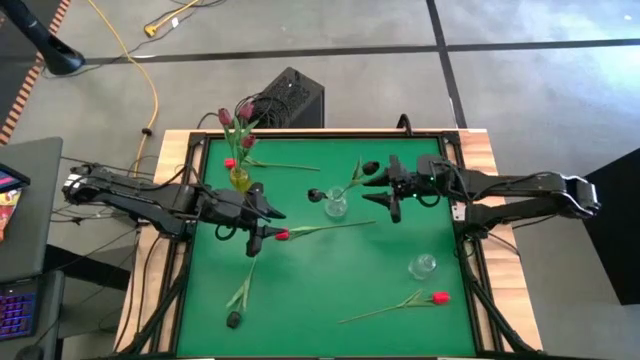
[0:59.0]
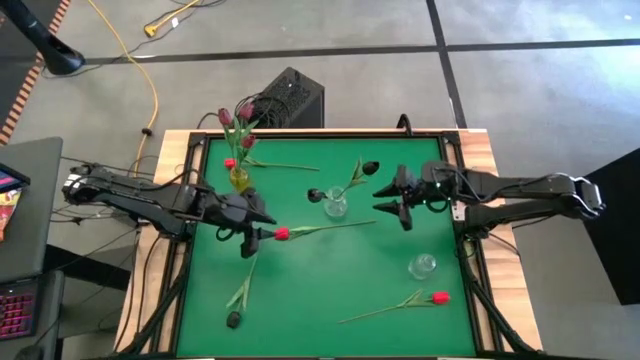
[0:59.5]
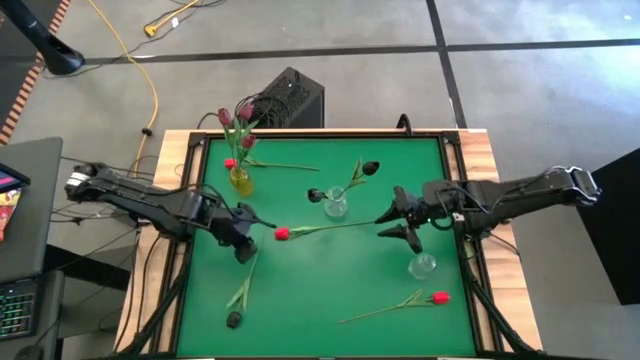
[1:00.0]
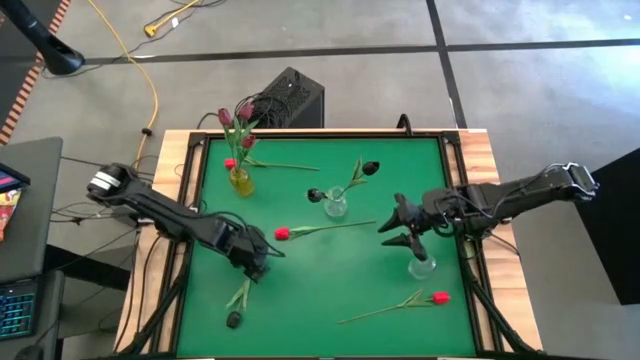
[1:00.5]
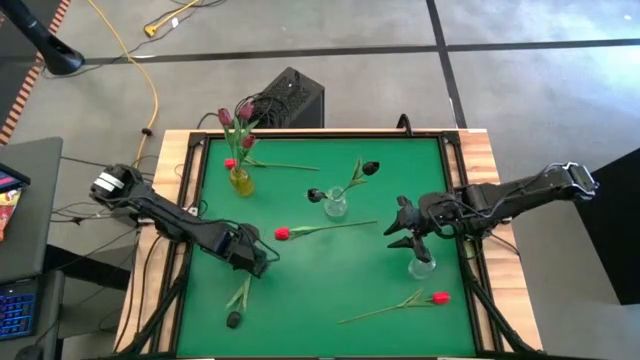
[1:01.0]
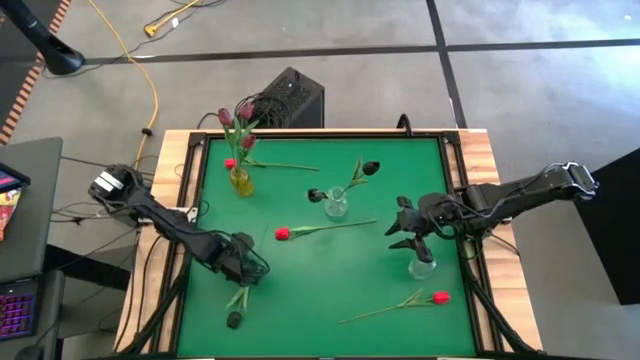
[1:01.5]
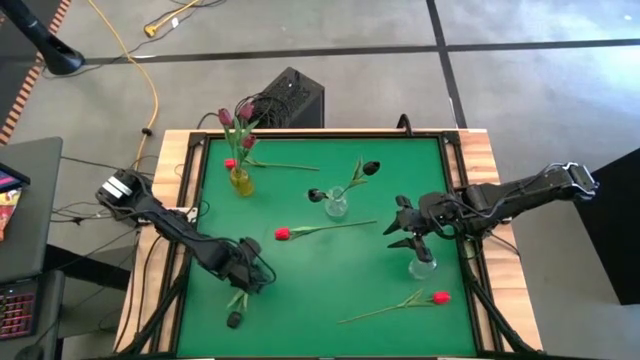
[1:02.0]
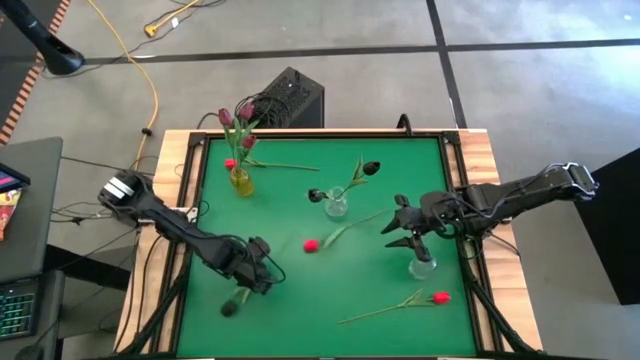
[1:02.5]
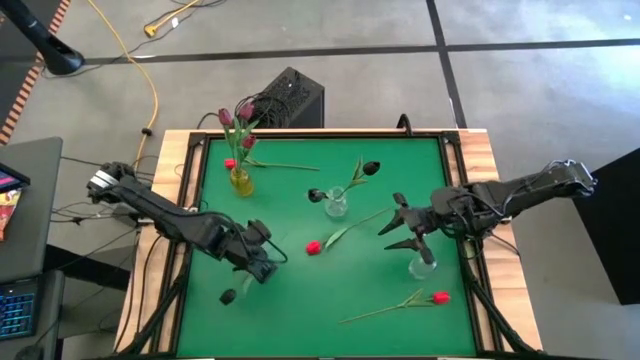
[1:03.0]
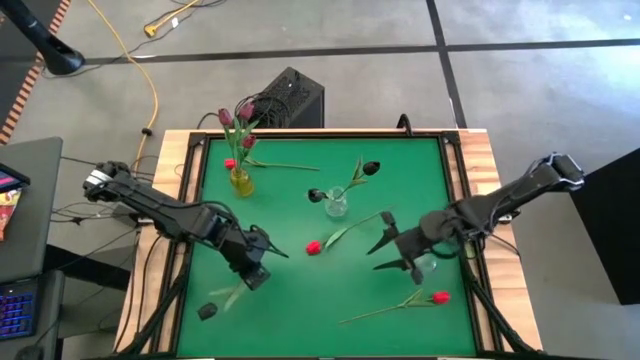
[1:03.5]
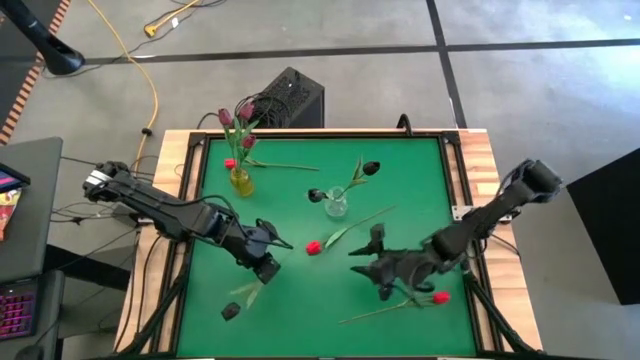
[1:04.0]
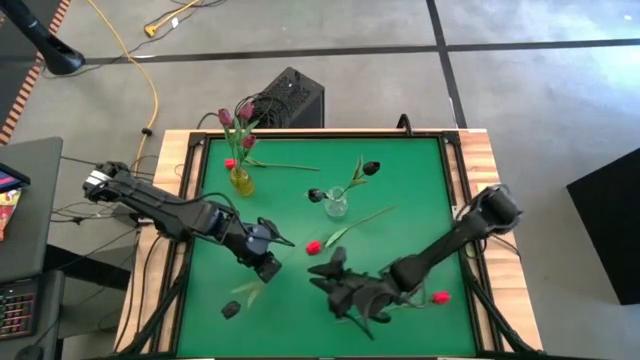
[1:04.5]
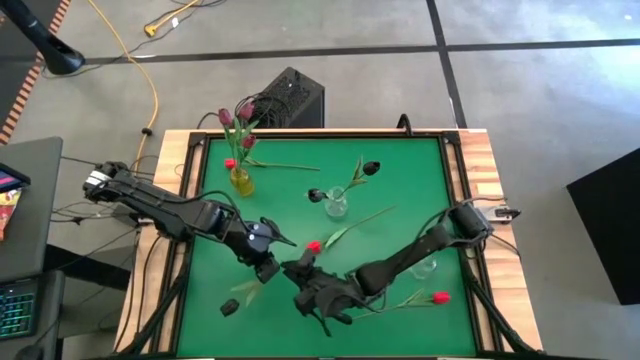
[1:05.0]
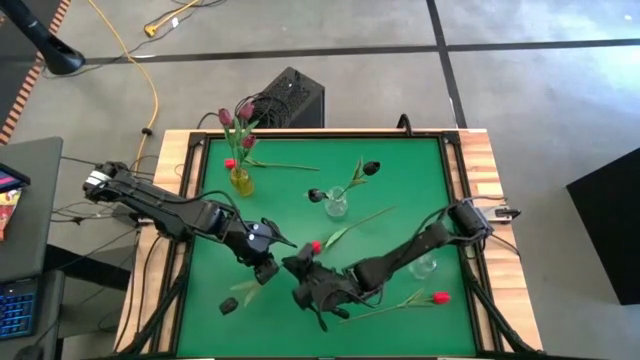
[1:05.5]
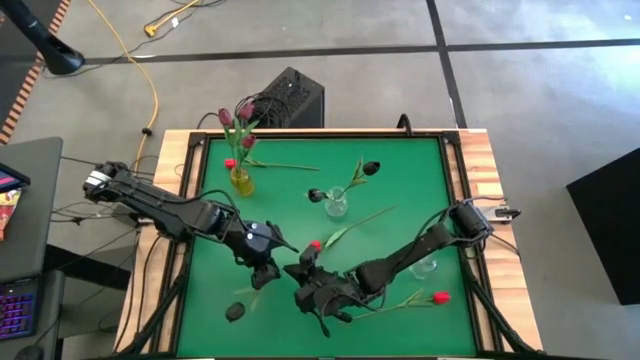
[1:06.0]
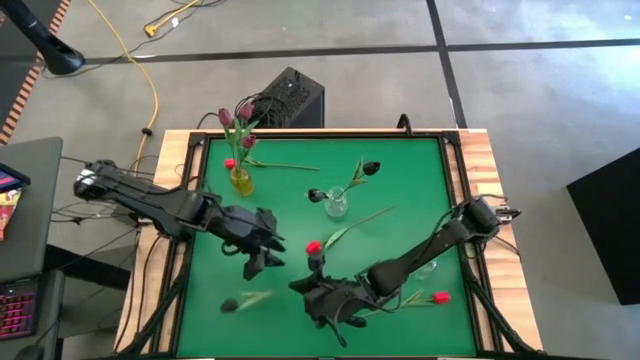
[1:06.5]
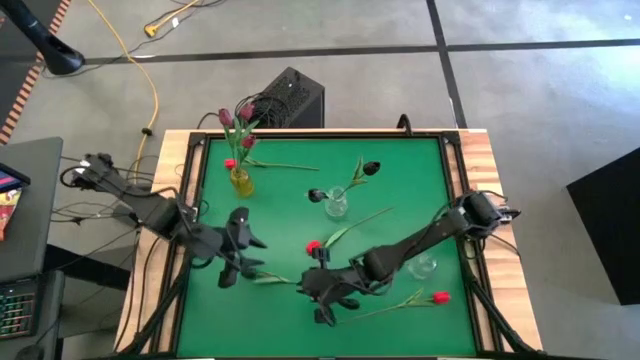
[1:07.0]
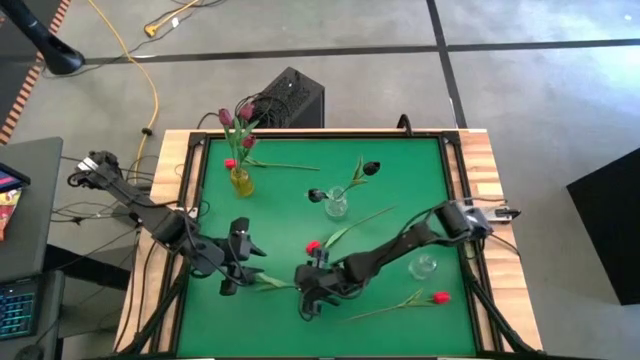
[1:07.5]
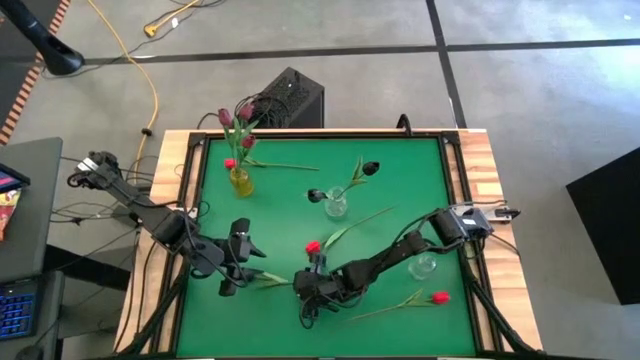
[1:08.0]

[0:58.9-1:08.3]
Task: Sort flowers into vase by color
Put the black flower into the left transparent vase

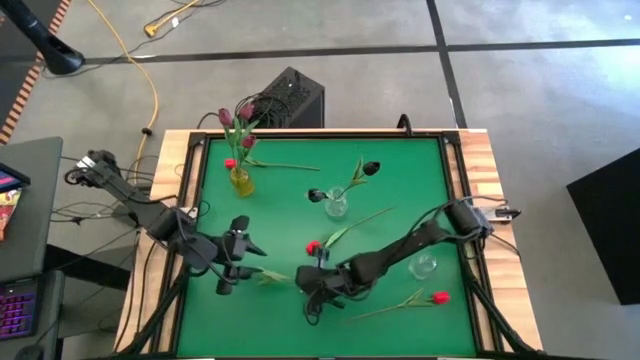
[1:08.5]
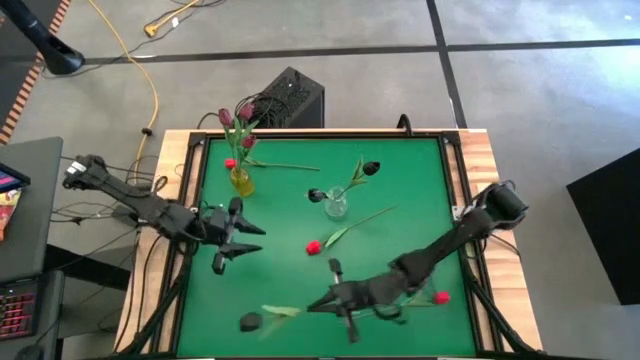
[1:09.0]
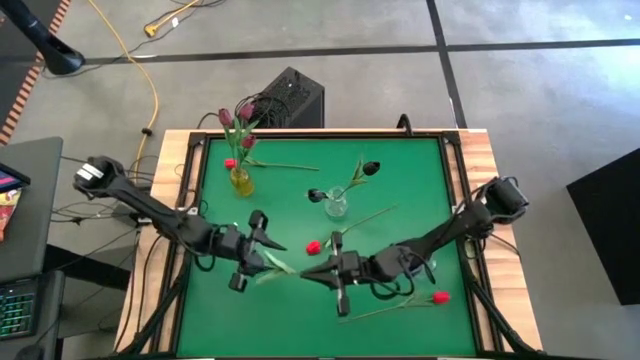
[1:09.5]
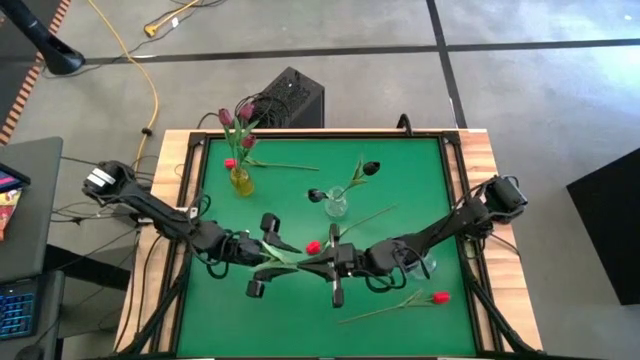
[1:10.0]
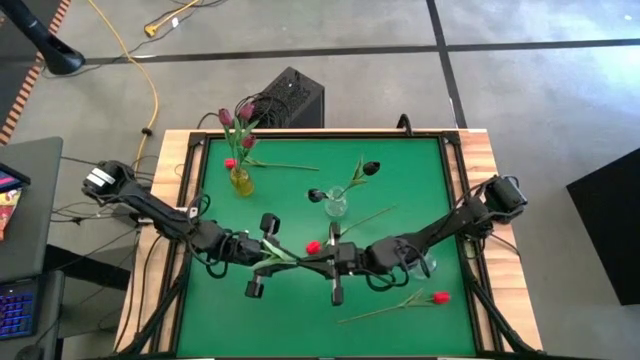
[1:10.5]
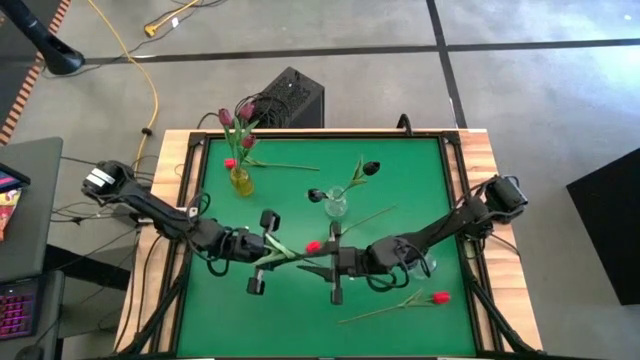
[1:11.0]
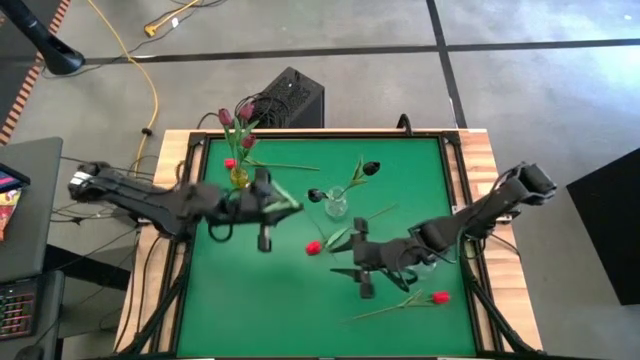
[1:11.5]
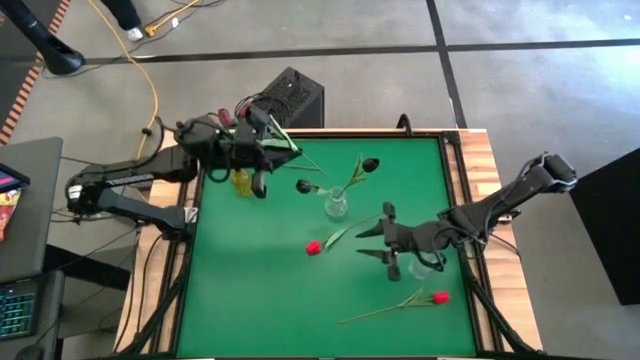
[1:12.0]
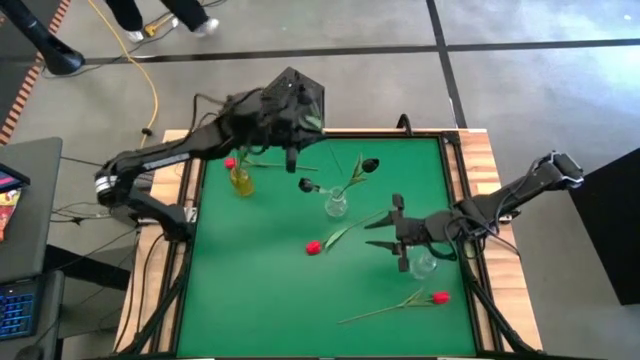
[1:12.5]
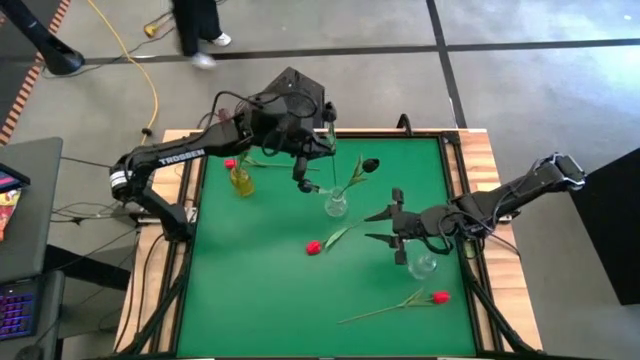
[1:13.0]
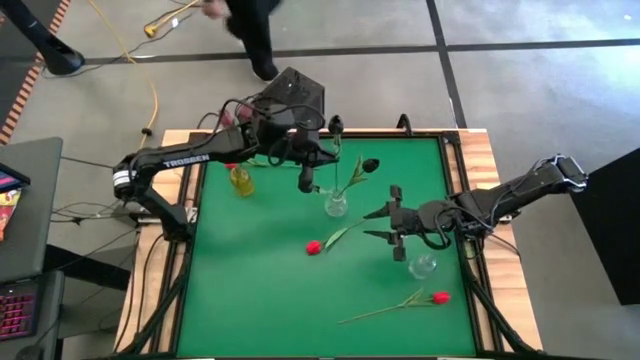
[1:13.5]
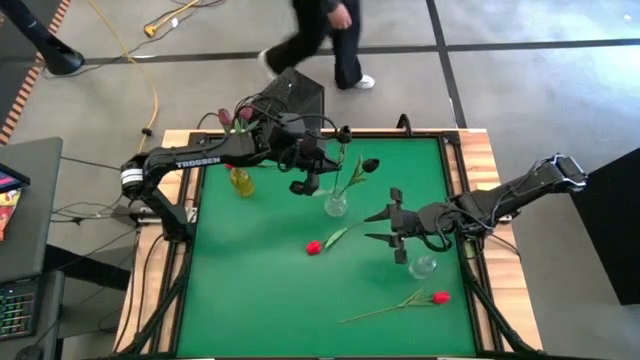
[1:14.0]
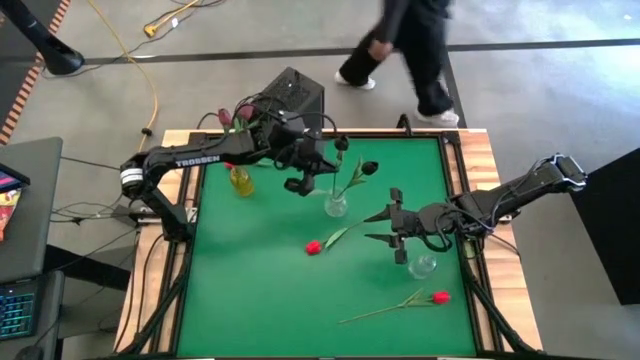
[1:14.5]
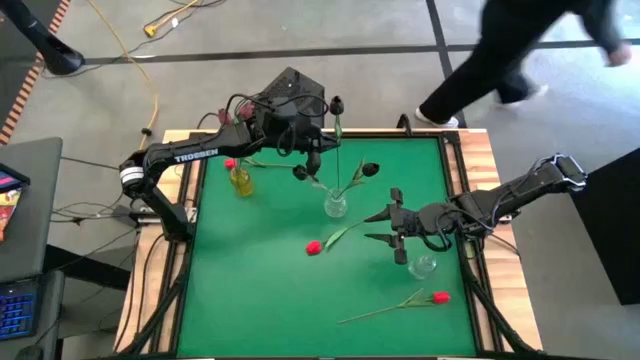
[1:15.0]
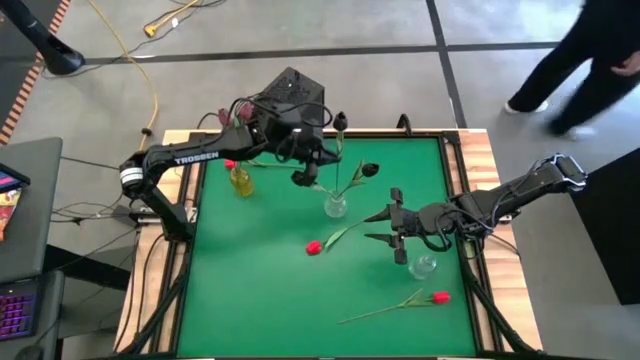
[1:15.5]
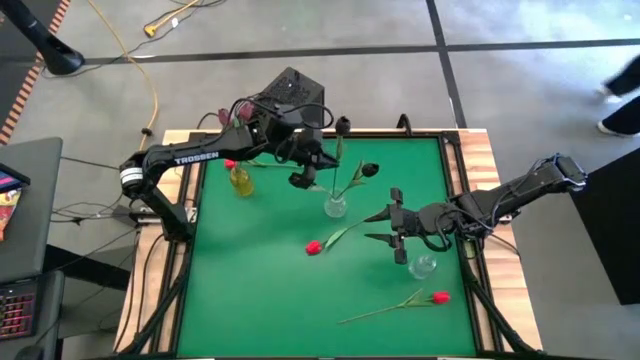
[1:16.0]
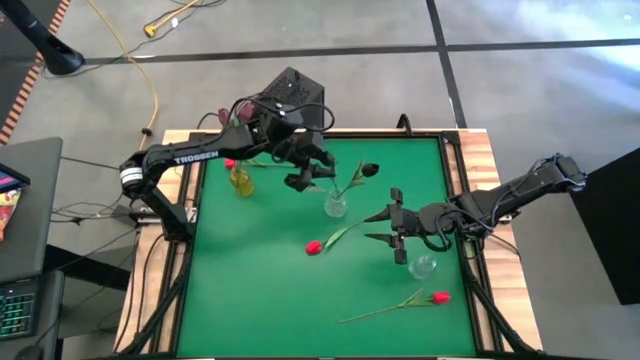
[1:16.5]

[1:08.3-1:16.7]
Put the black flower into the left transparent vase

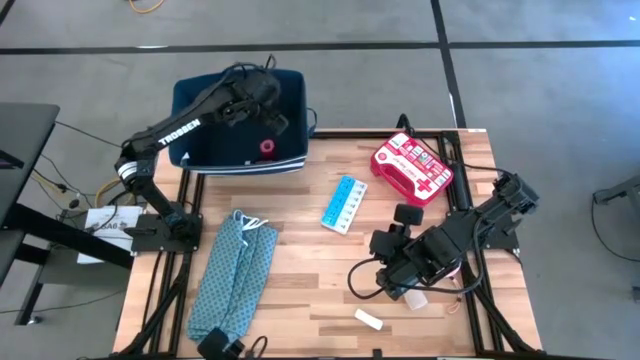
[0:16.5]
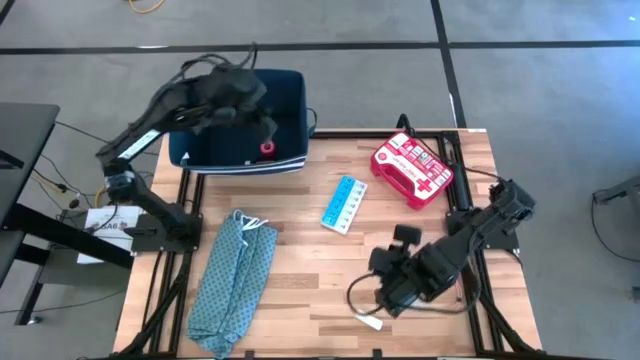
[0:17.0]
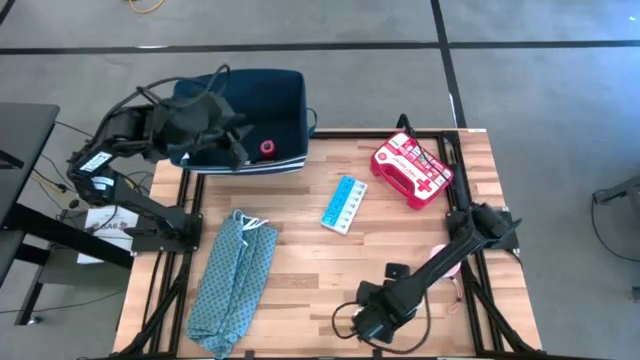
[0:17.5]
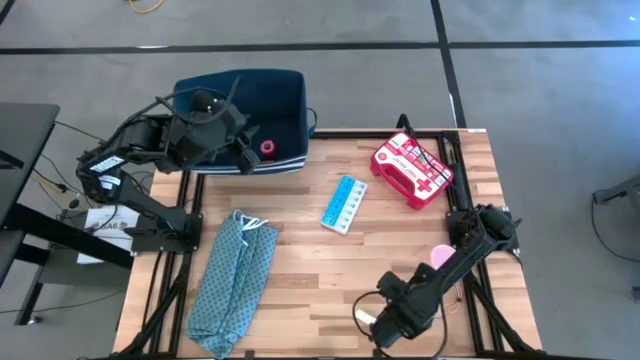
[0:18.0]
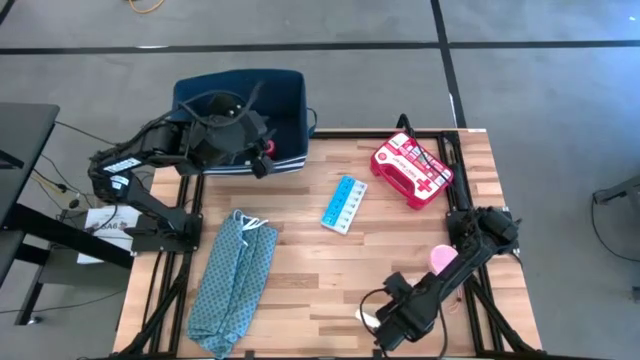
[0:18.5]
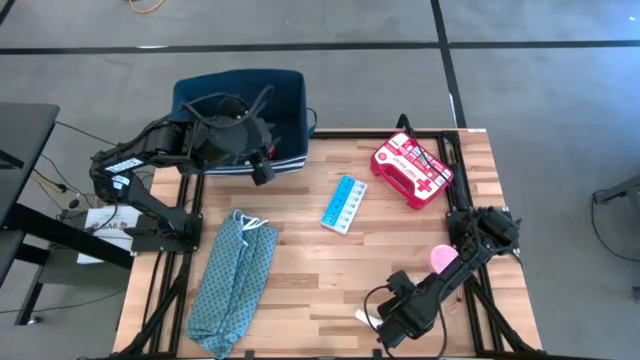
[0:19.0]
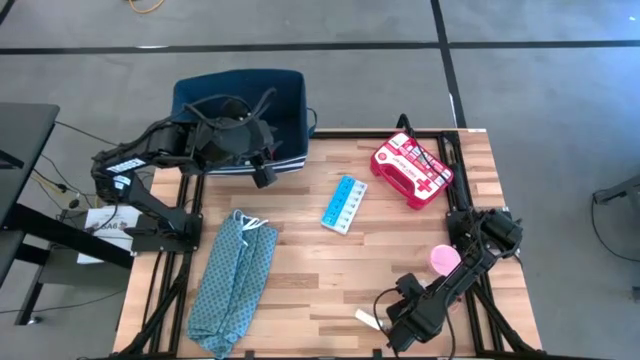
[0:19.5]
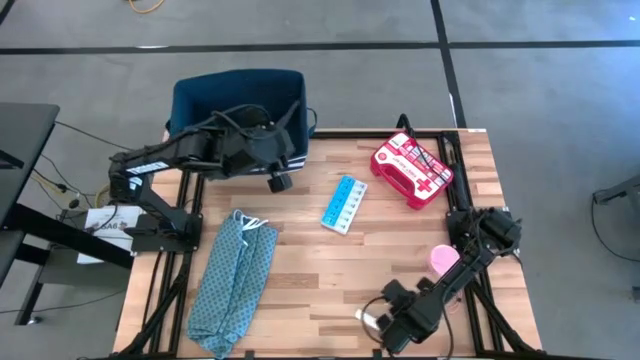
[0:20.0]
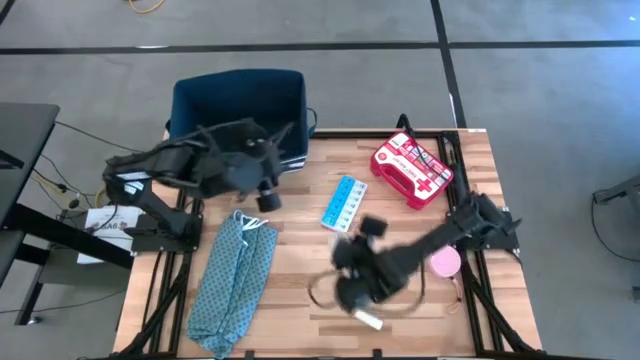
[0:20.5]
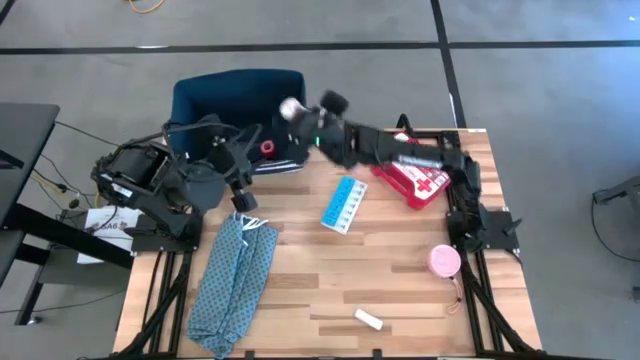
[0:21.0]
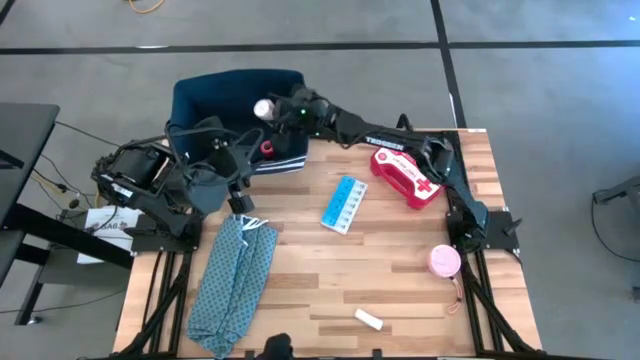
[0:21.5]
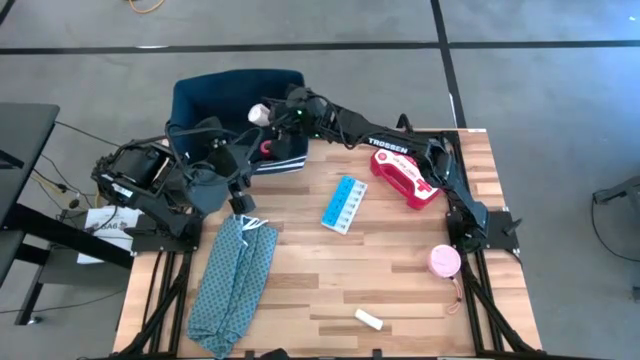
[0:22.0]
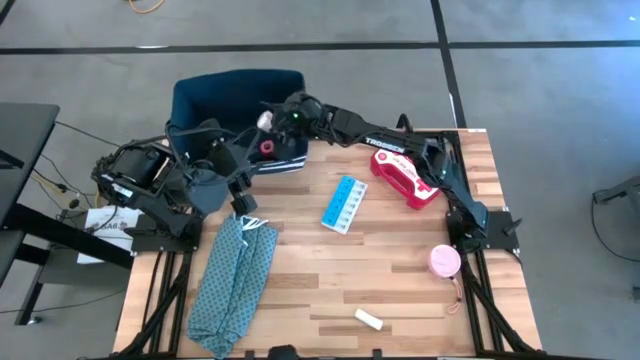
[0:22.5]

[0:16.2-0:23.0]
Task: Pick & place medical supplies in basket/bin
Put the brown bandage into the blue bin
